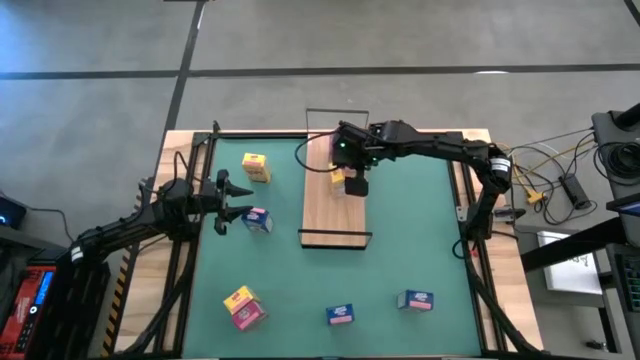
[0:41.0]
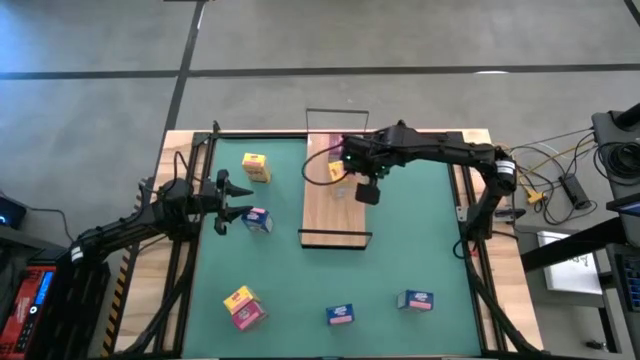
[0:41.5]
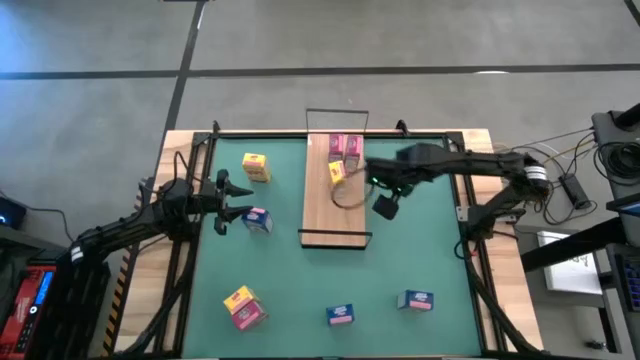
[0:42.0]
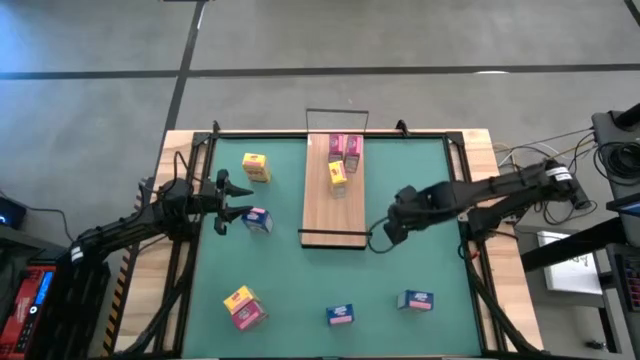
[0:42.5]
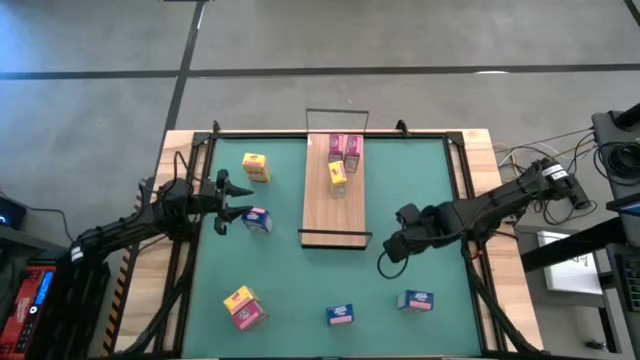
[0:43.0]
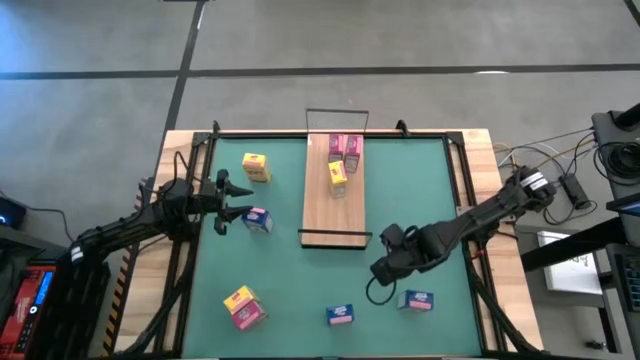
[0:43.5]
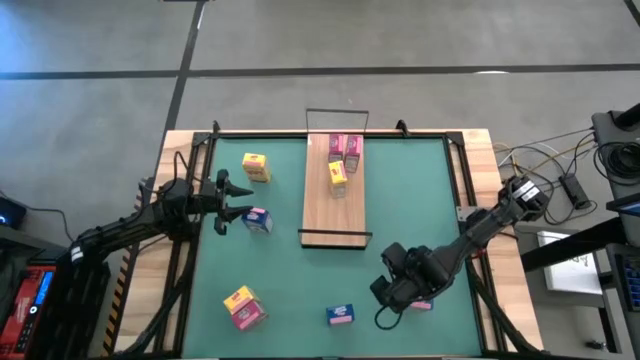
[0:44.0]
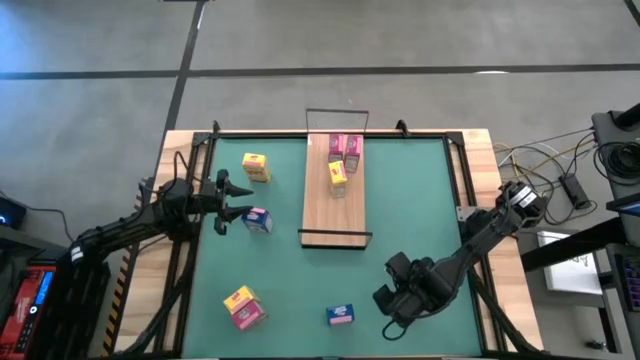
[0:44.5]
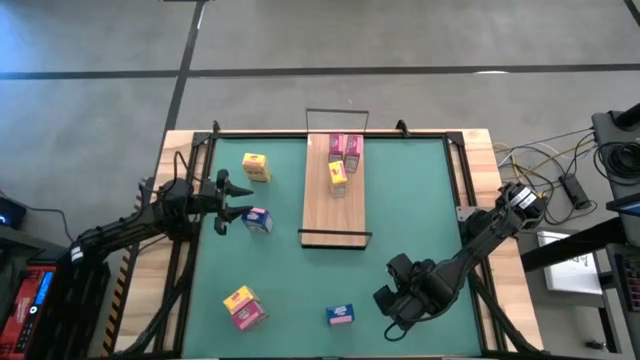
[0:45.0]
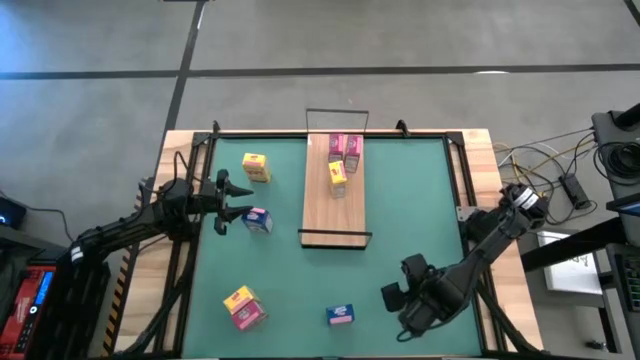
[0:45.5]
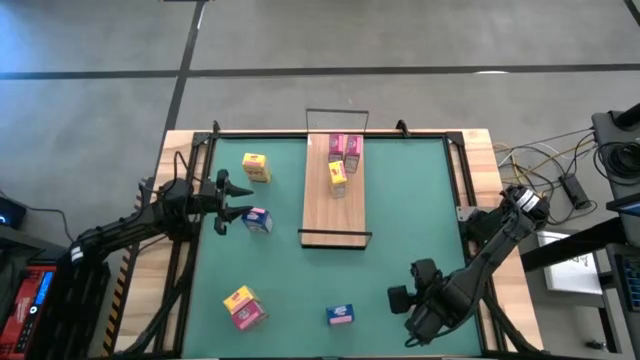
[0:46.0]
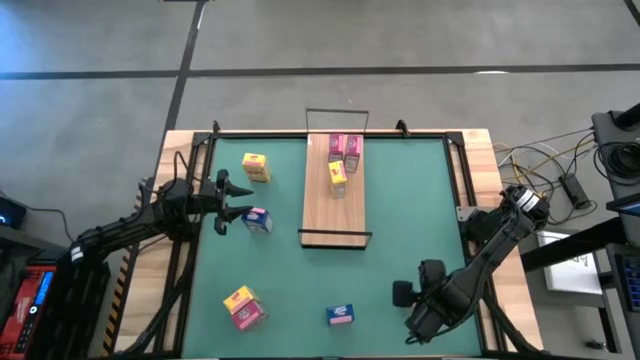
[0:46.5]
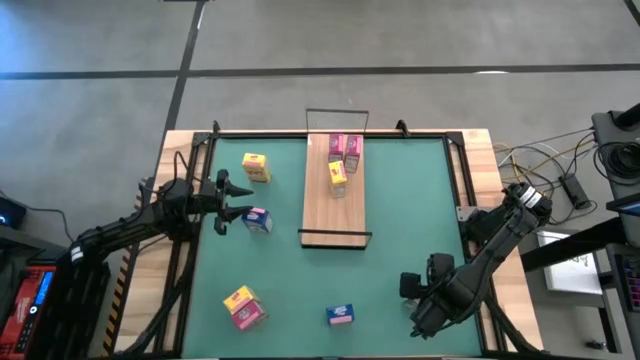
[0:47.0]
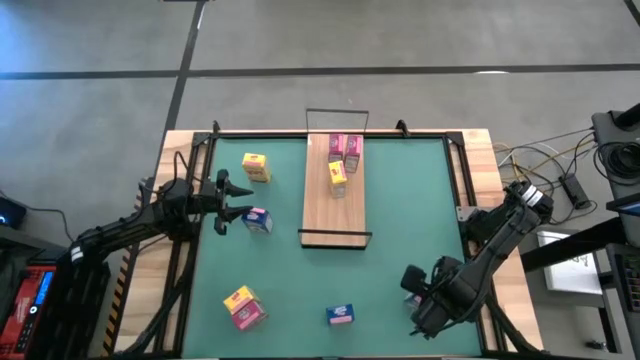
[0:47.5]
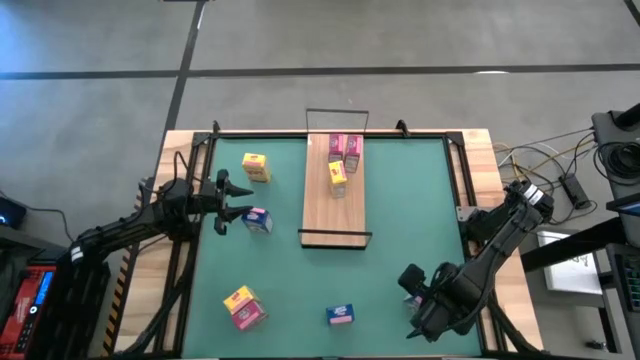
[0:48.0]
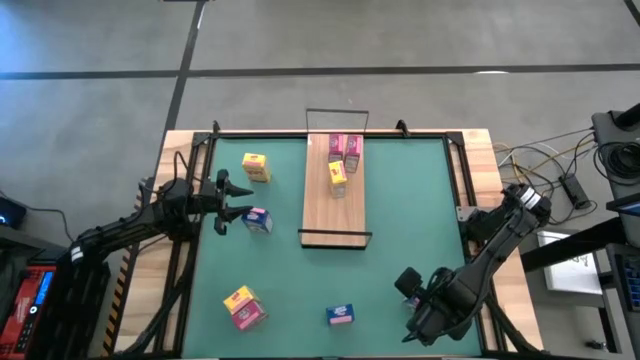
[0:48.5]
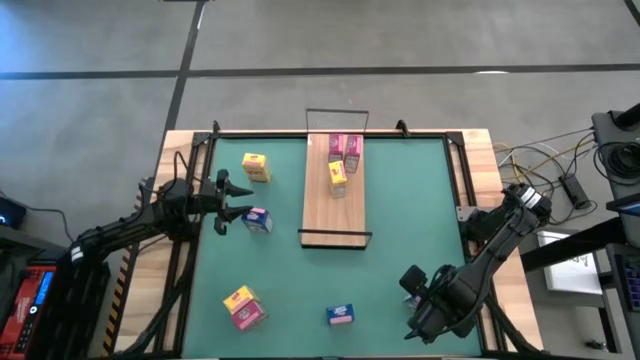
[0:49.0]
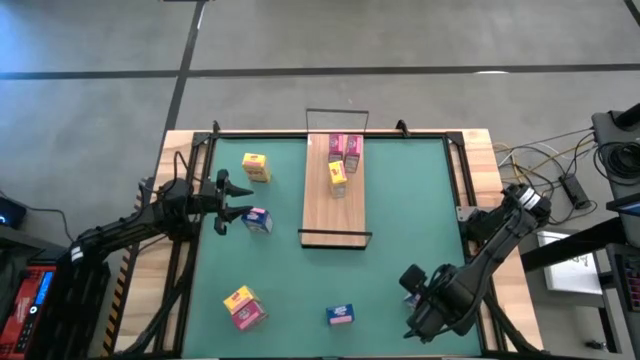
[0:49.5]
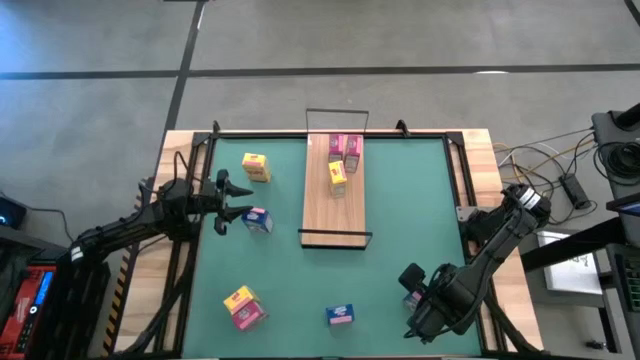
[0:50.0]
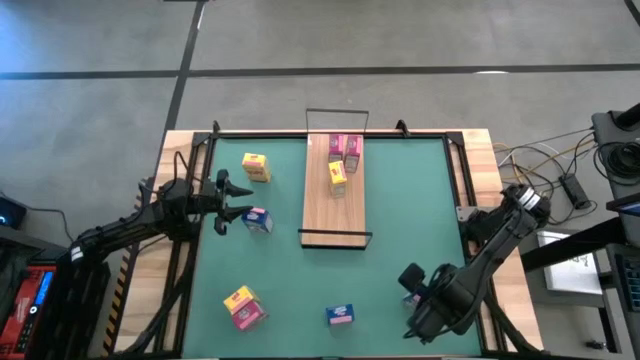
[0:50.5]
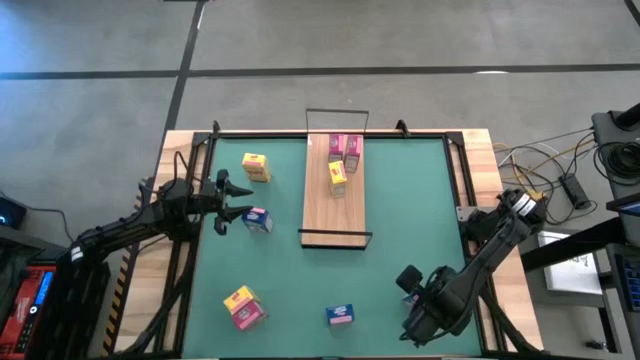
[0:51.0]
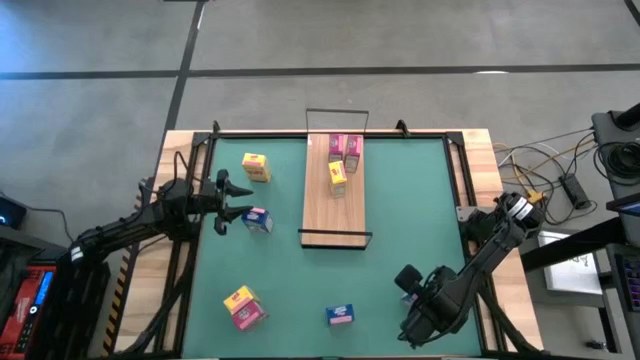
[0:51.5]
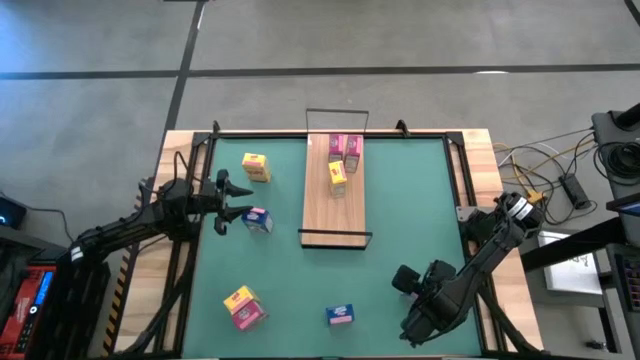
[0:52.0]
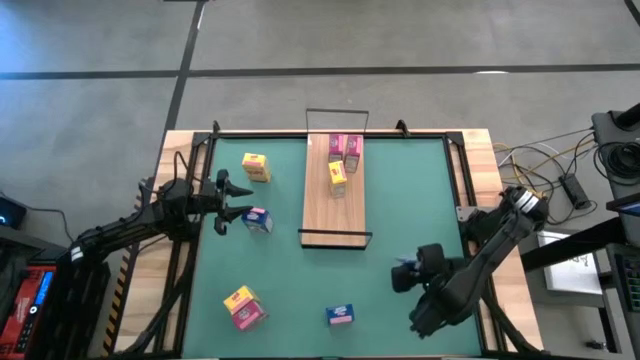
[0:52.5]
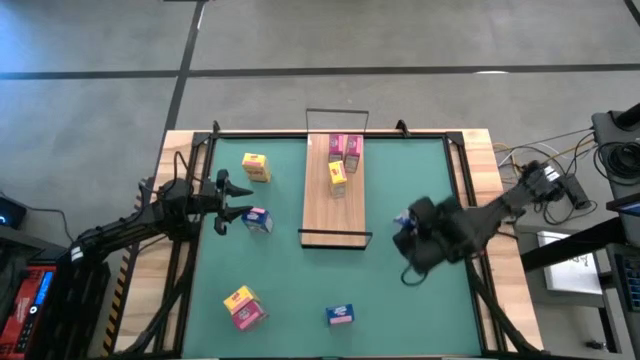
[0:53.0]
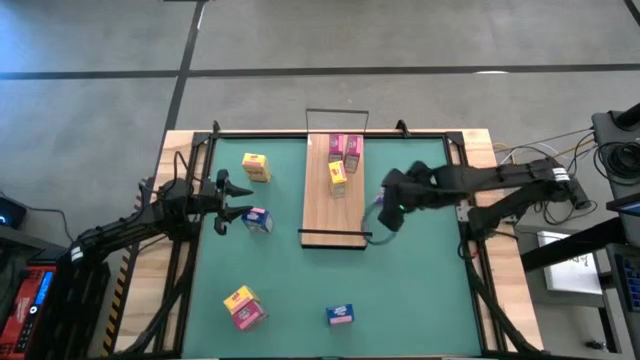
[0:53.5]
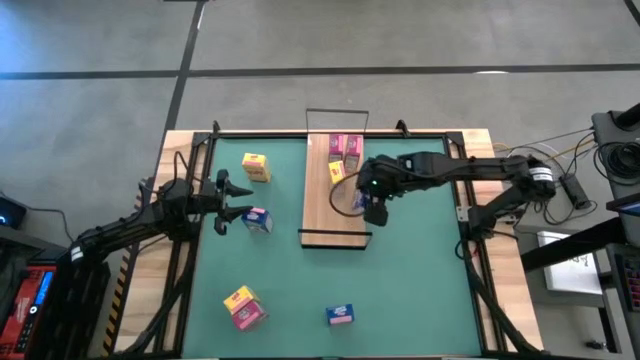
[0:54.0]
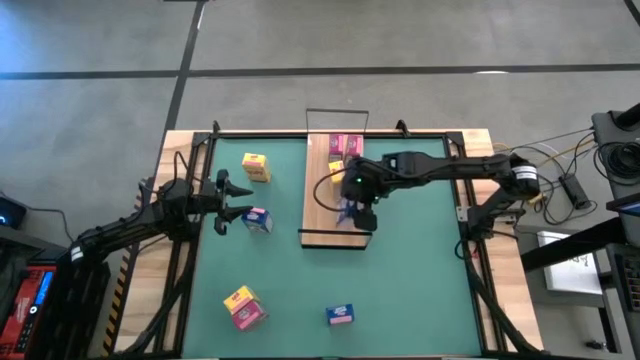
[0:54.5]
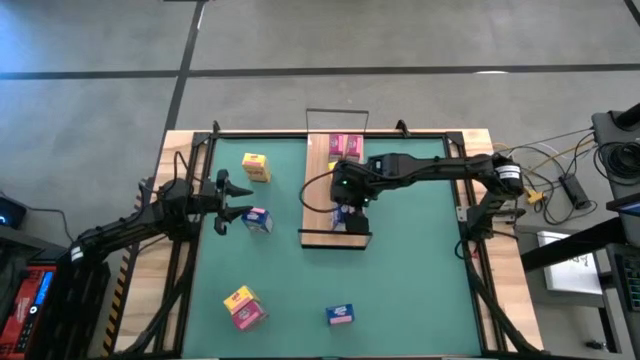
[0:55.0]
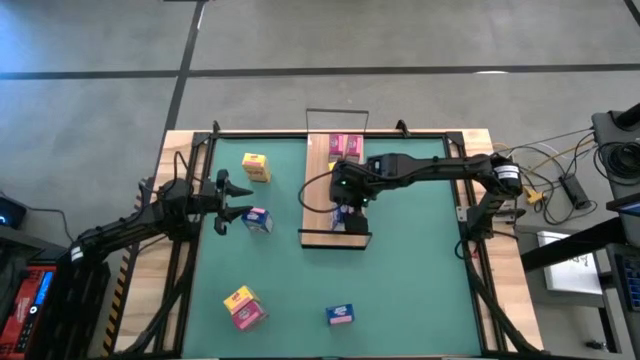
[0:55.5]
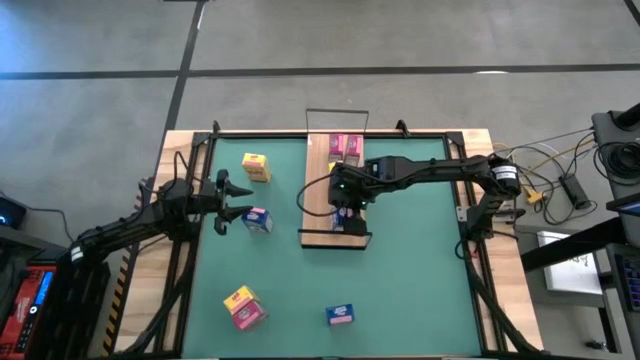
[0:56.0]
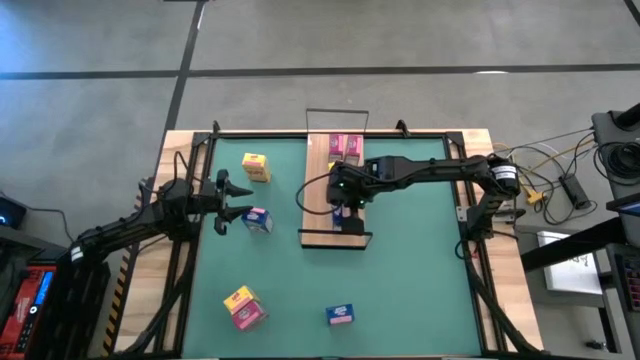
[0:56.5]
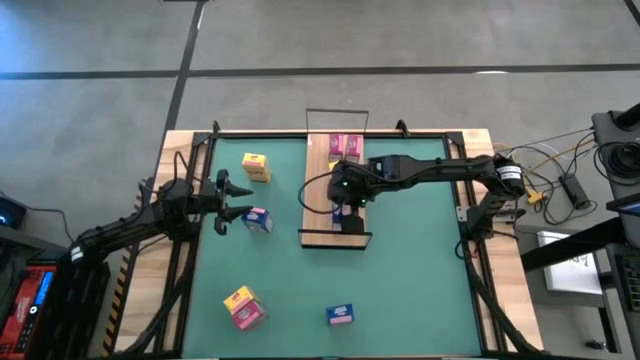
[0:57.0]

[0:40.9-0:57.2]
Task: Stack cereal on shelf
Put the bottom right blue cereal box on the shelf
